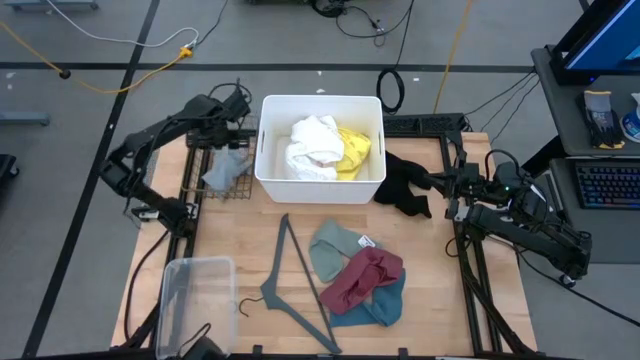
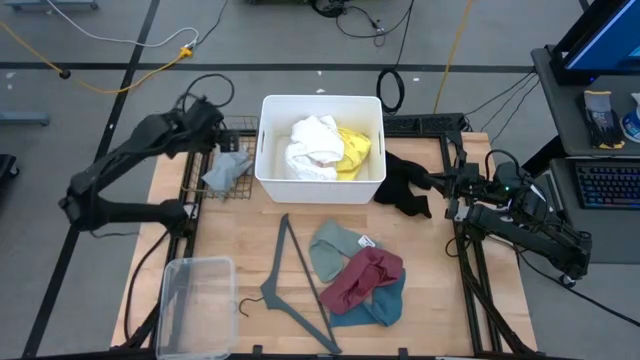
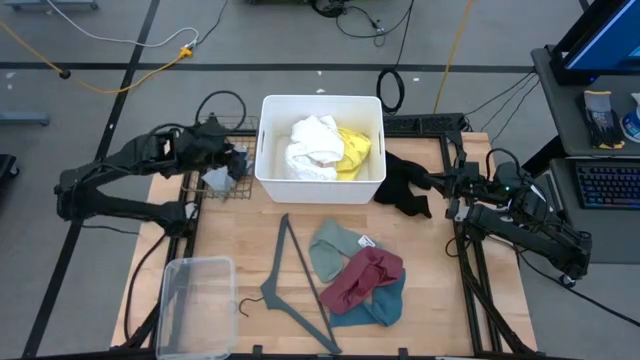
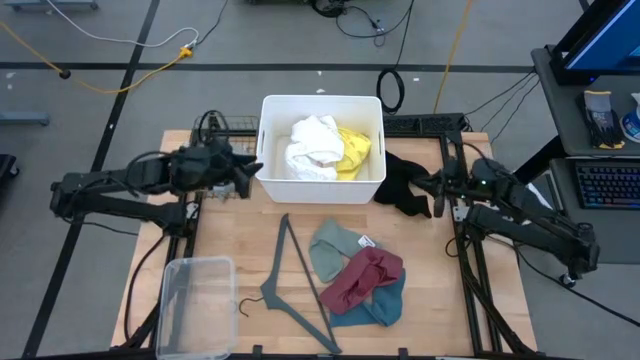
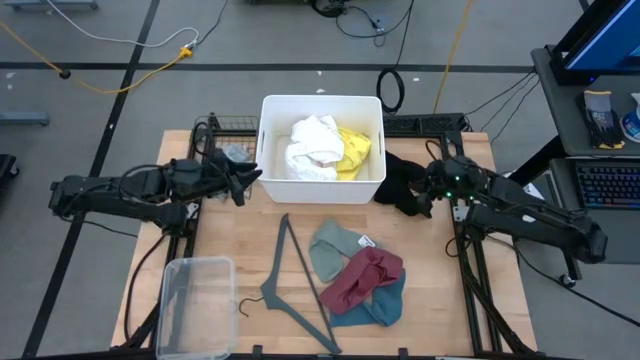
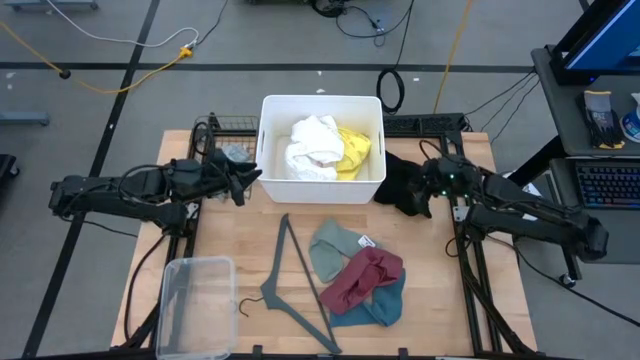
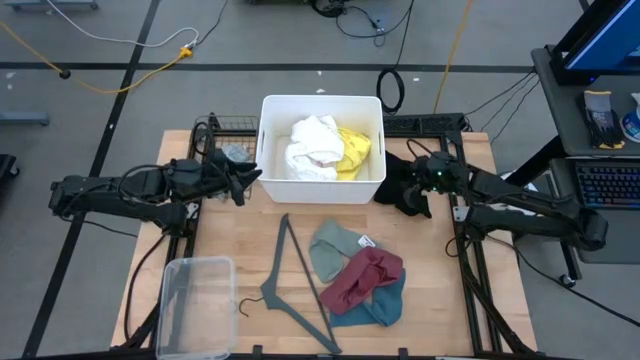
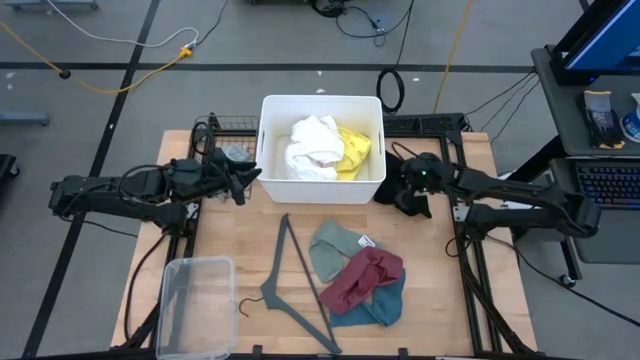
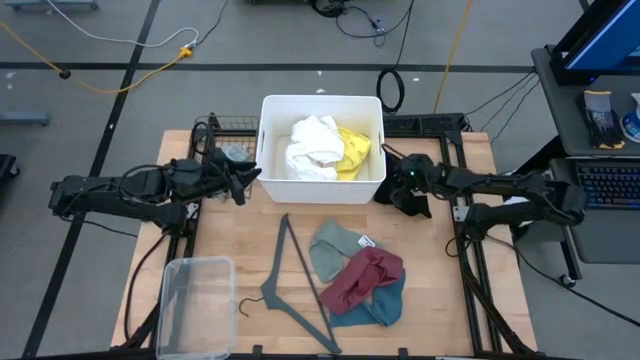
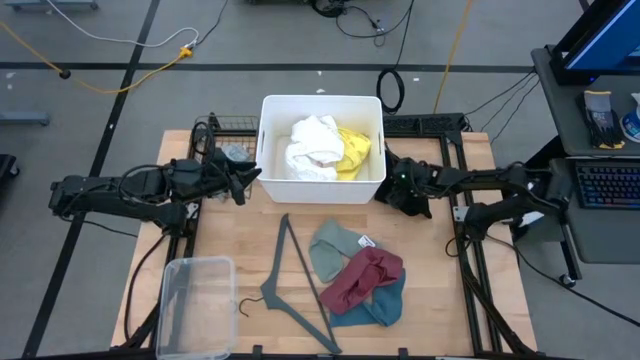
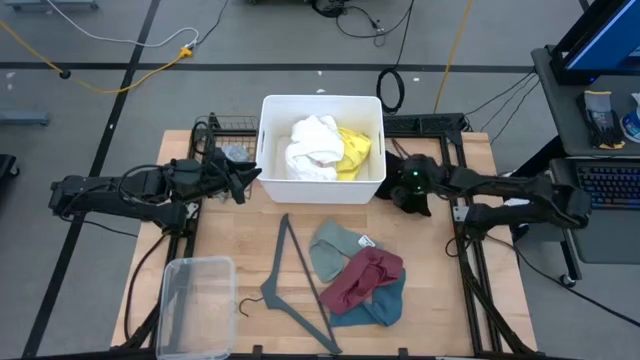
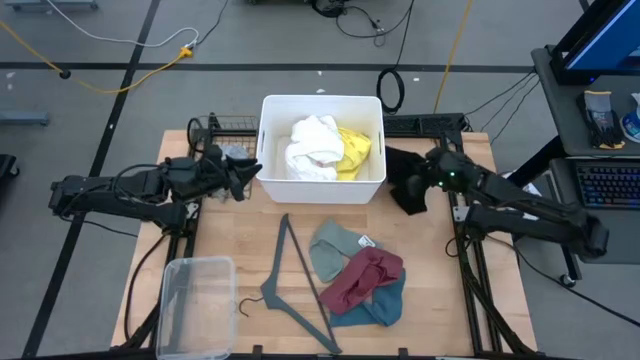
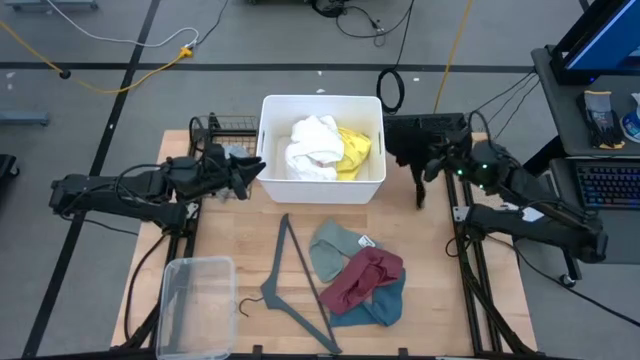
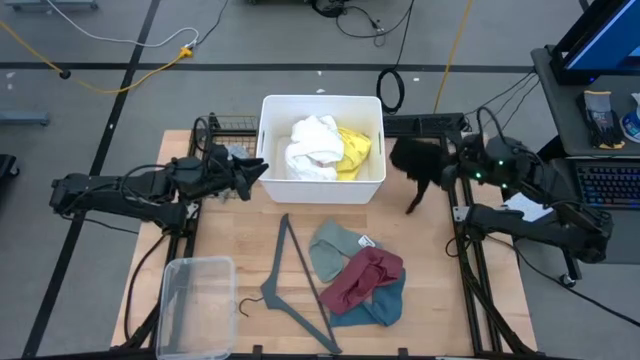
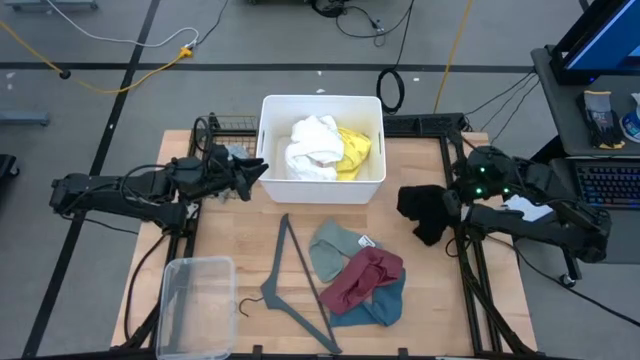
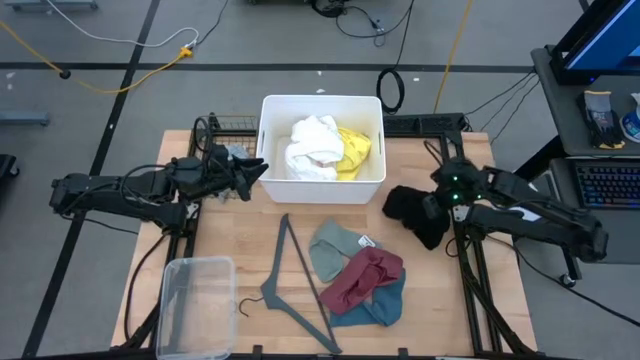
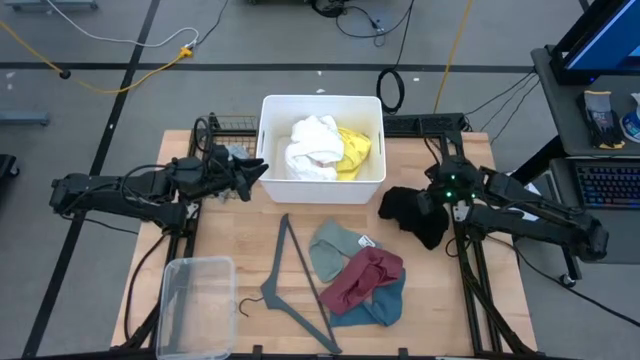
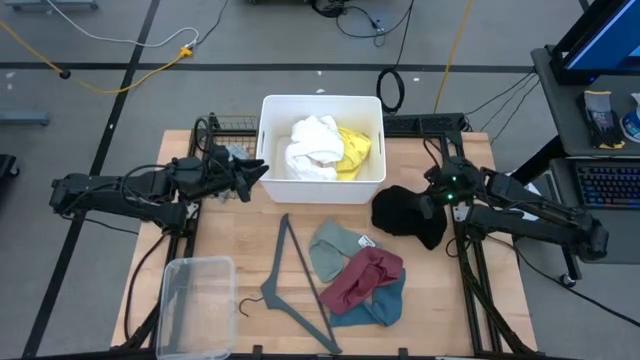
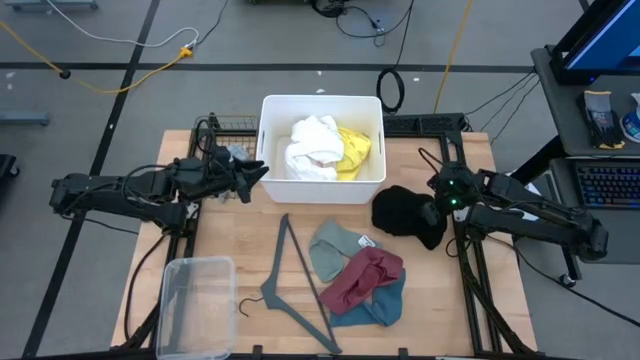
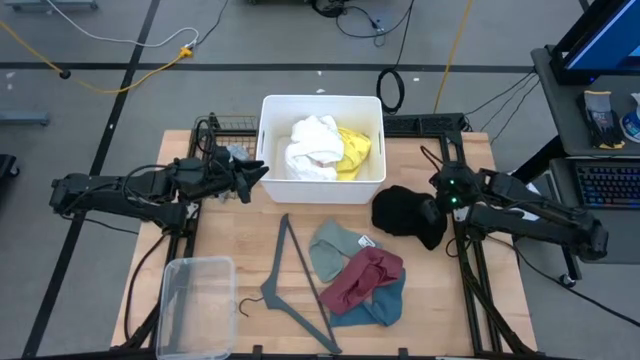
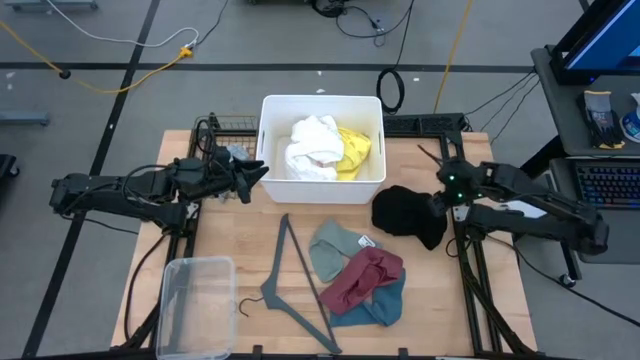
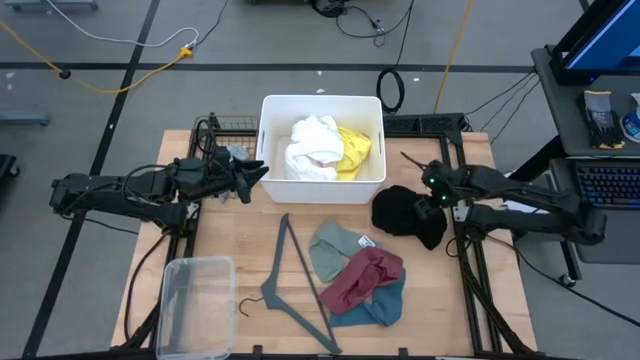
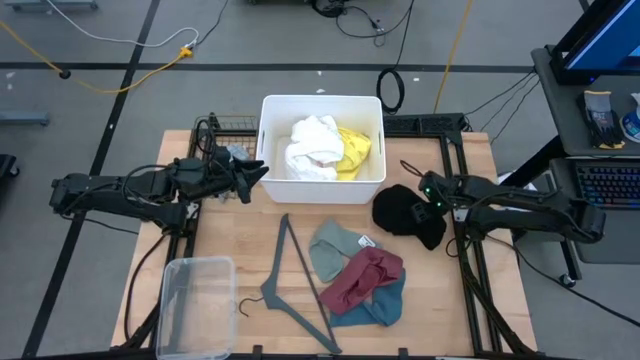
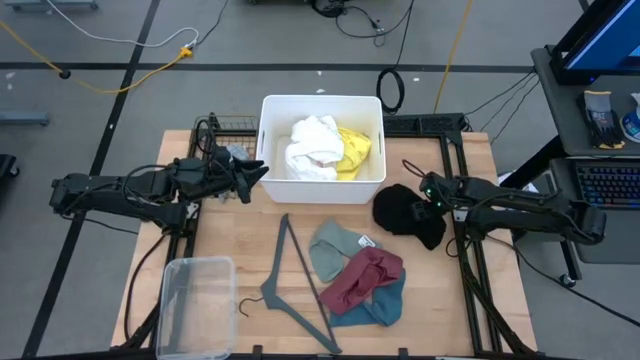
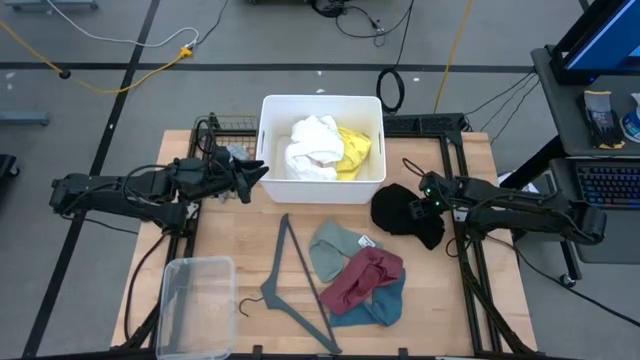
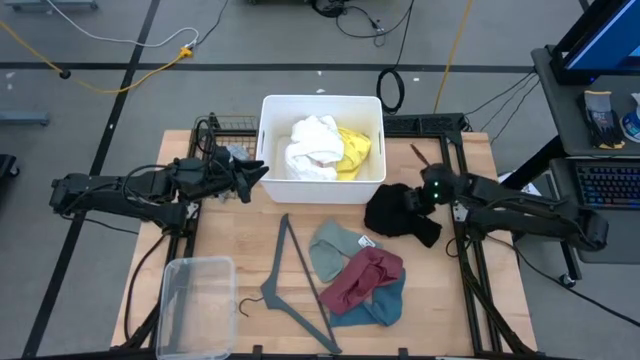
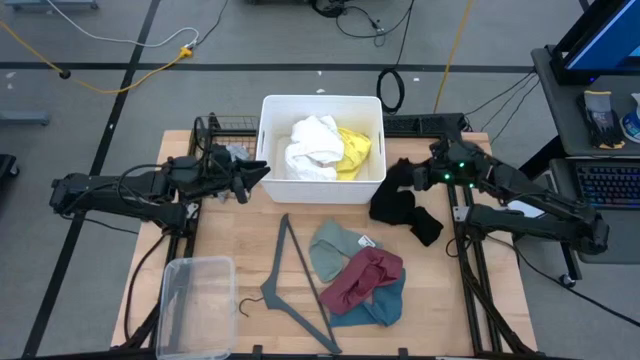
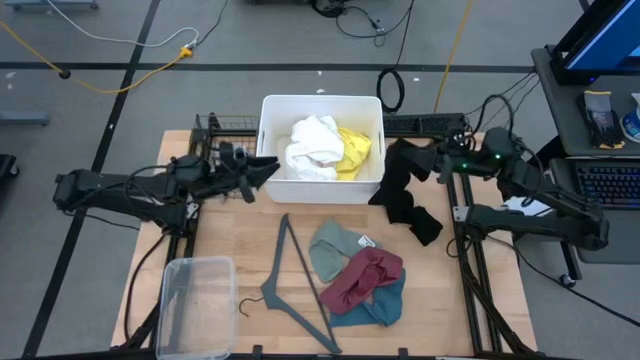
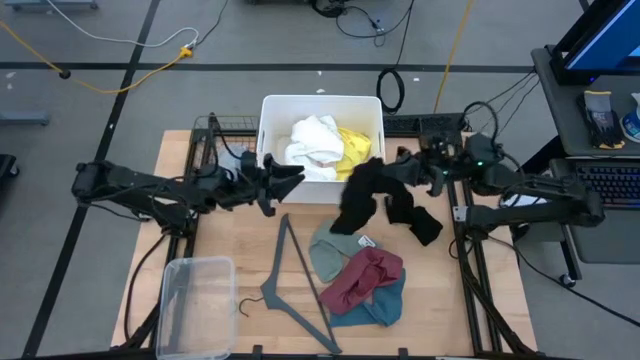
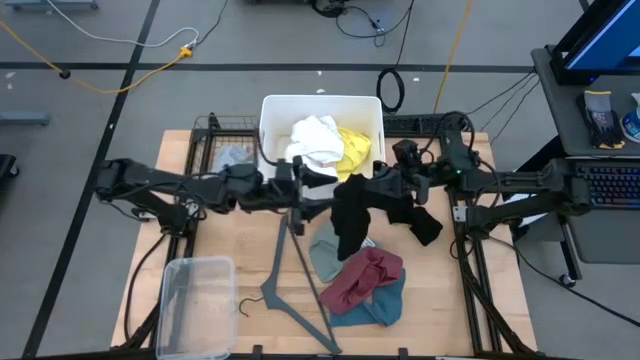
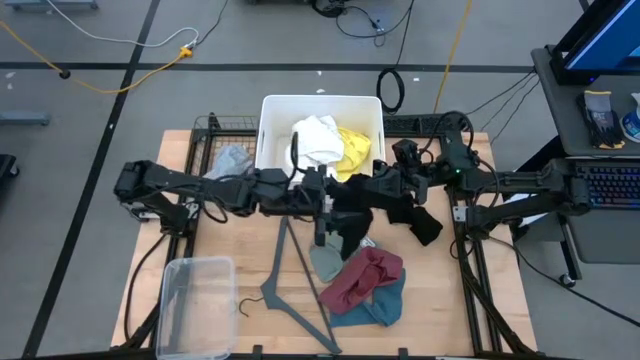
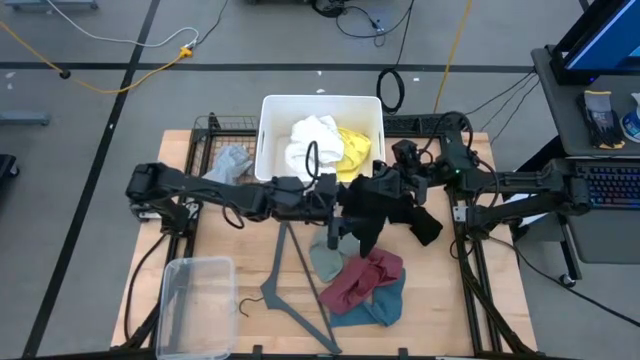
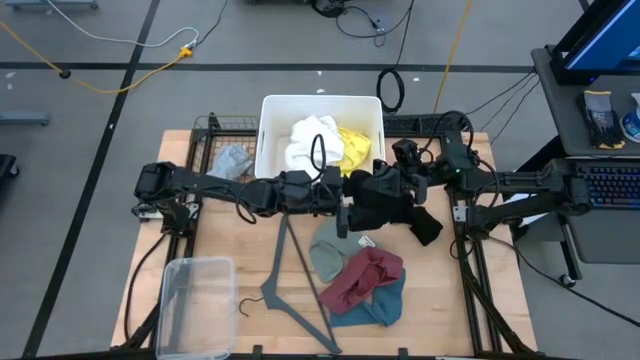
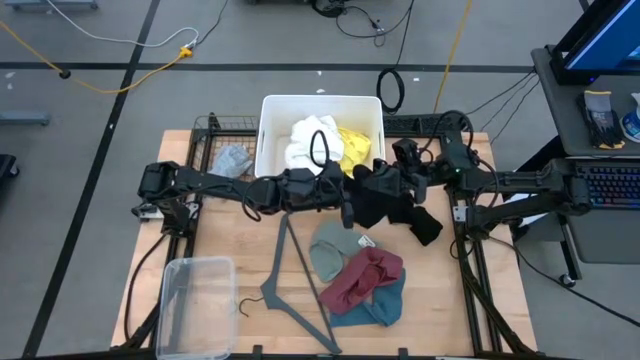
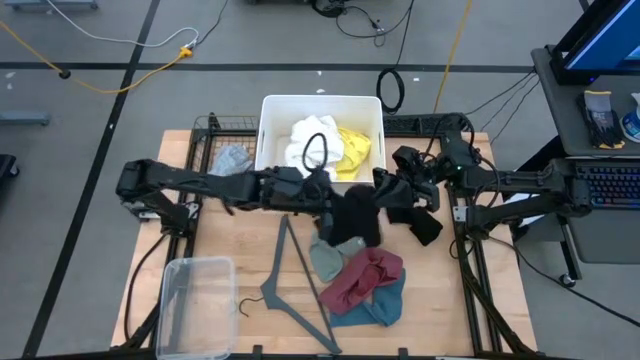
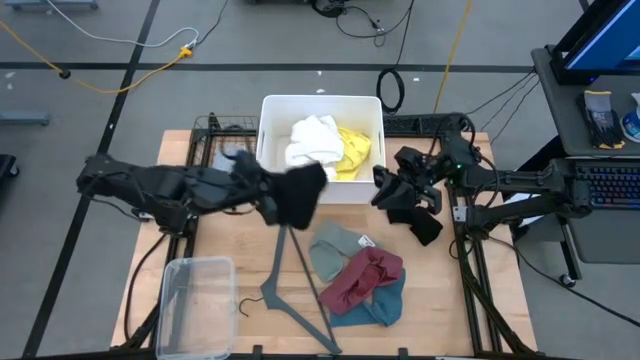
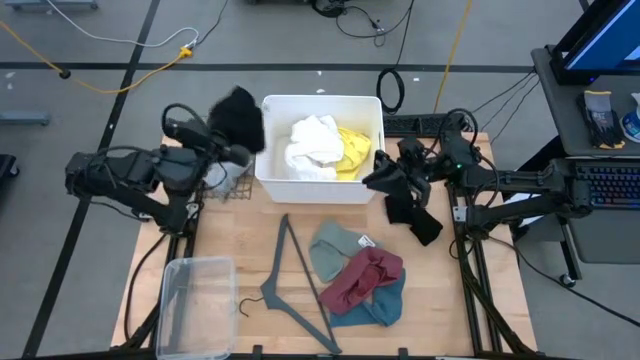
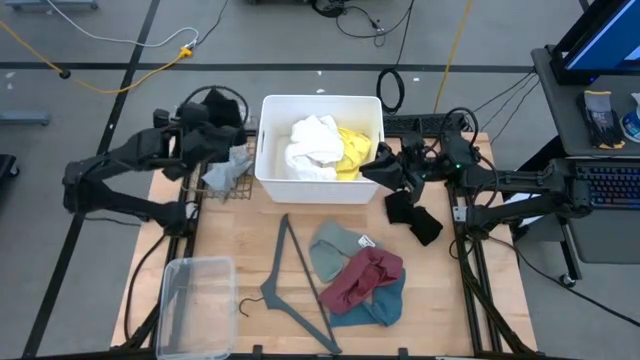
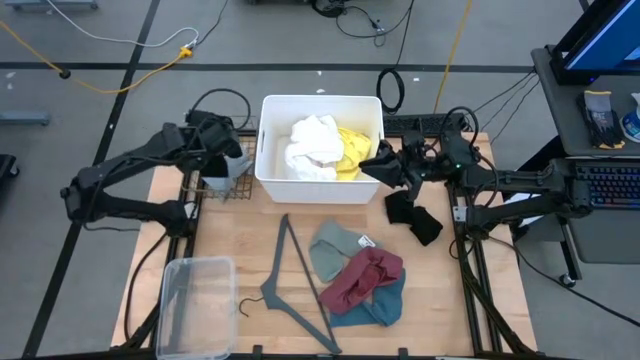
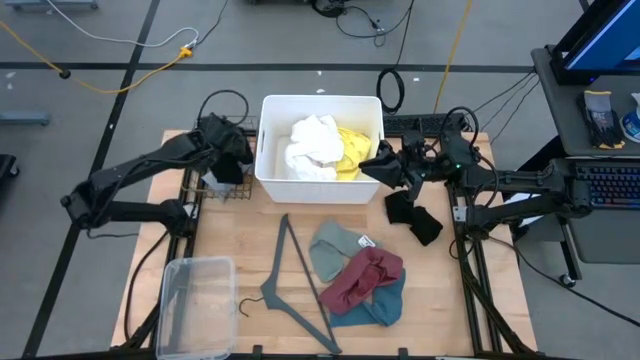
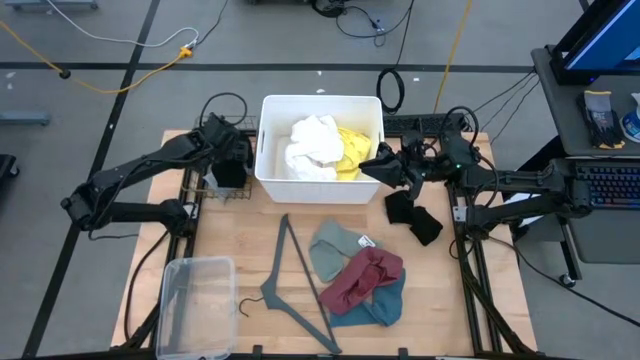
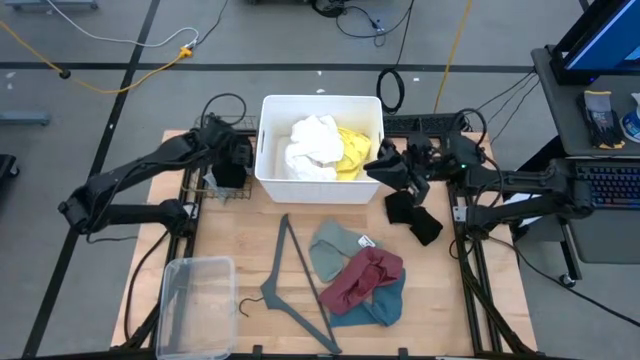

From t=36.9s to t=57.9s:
Task: Pick & Place Cloths
Put the black pants into the gold wire basket

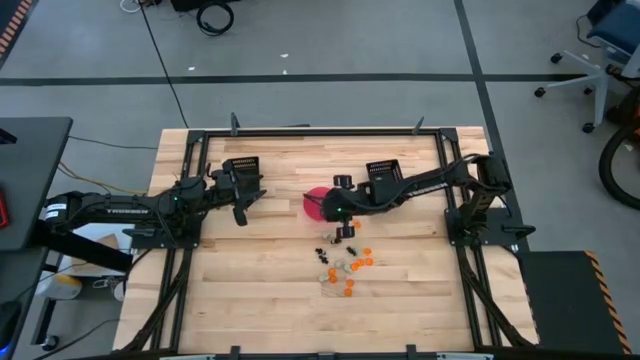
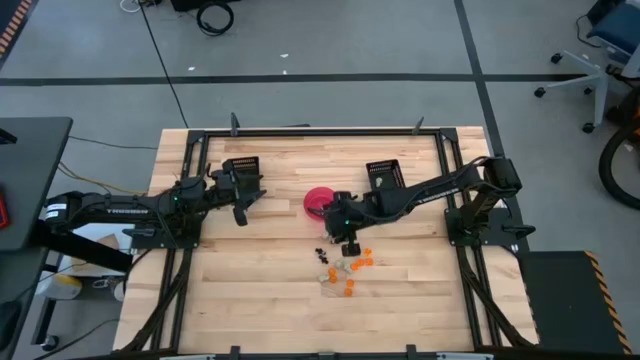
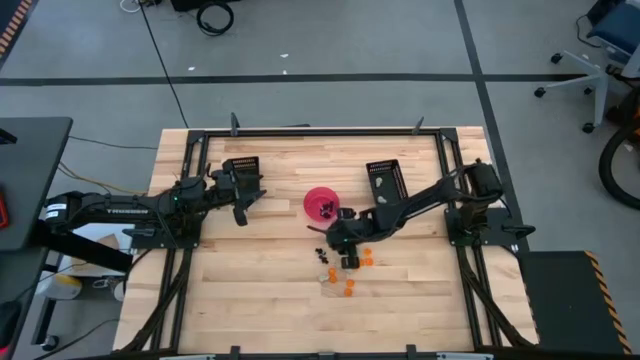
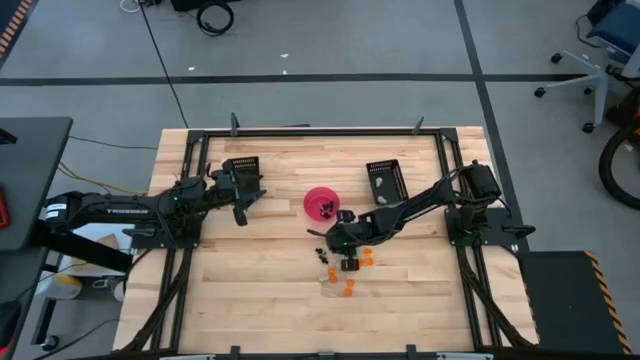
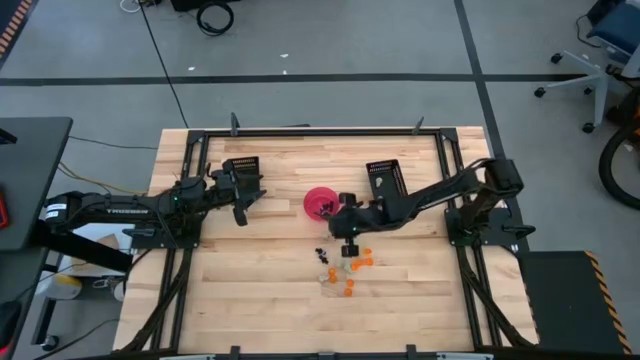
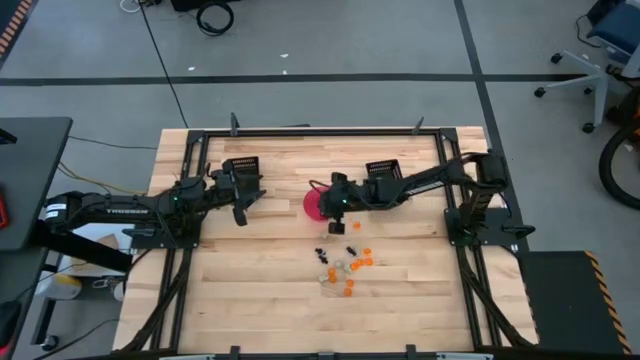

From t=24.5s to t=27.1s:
Task: Sort Halloween decoration
Put the black skeleton toy into the pink bin
